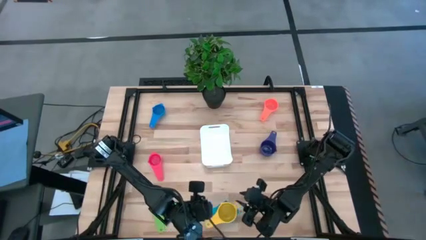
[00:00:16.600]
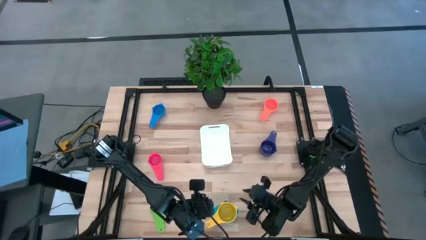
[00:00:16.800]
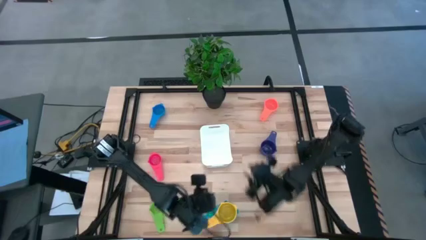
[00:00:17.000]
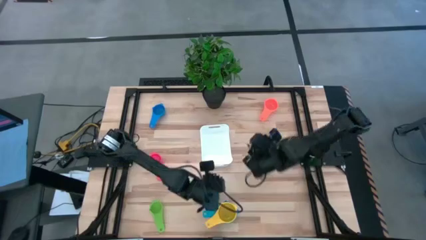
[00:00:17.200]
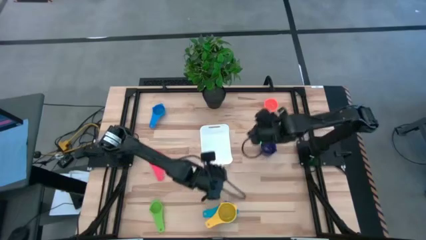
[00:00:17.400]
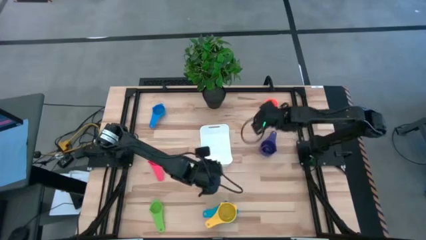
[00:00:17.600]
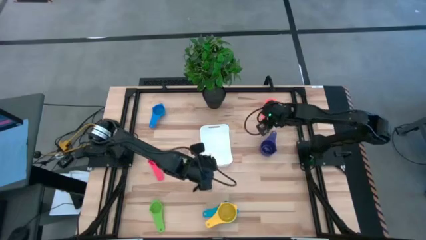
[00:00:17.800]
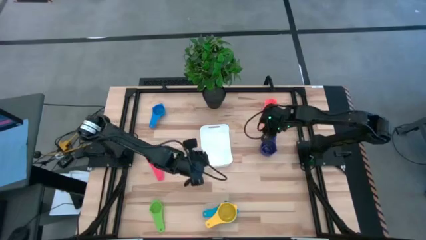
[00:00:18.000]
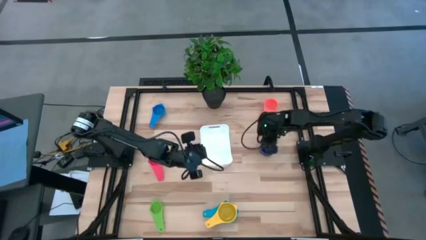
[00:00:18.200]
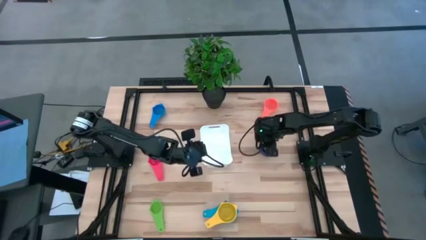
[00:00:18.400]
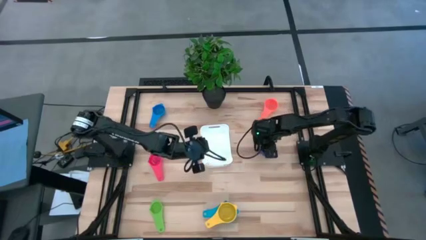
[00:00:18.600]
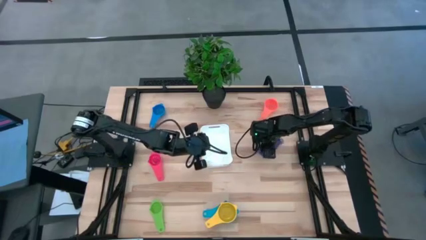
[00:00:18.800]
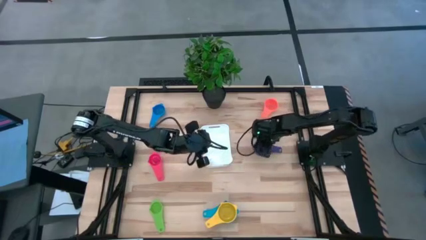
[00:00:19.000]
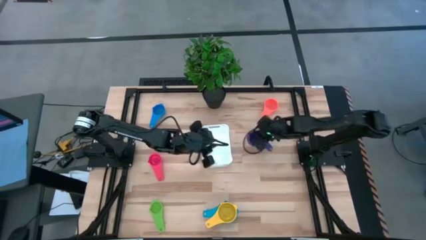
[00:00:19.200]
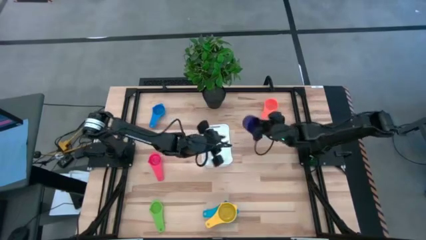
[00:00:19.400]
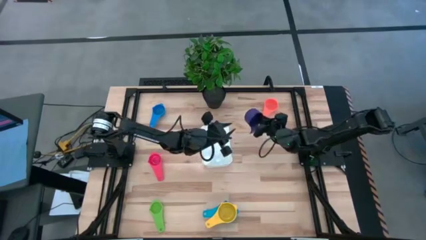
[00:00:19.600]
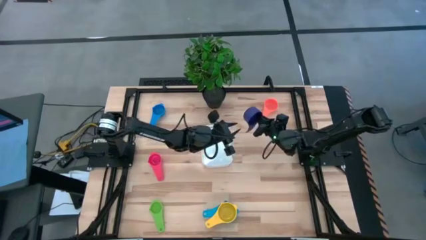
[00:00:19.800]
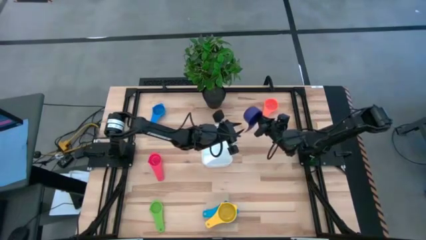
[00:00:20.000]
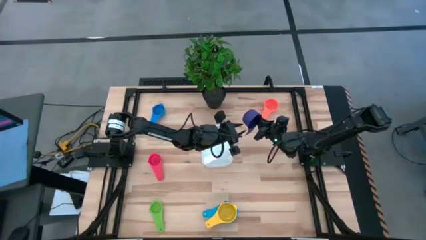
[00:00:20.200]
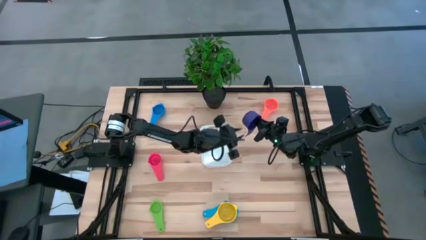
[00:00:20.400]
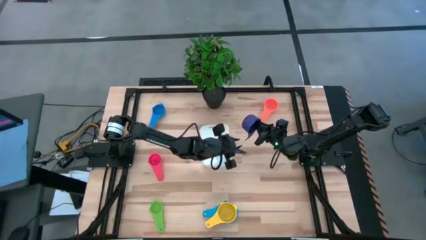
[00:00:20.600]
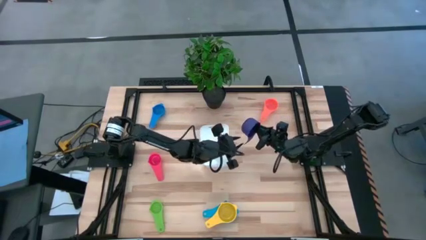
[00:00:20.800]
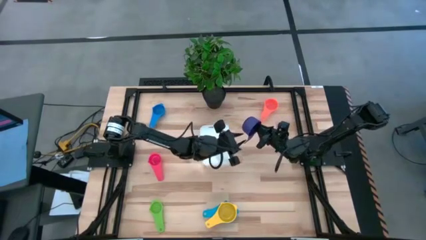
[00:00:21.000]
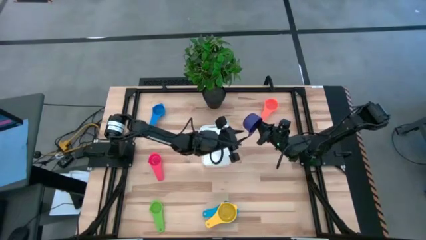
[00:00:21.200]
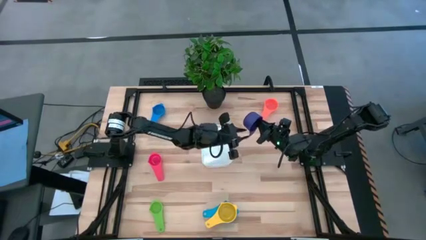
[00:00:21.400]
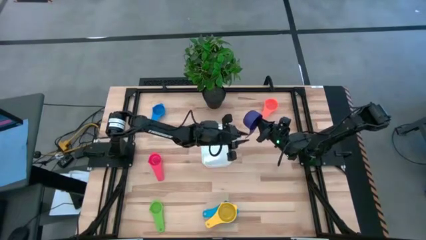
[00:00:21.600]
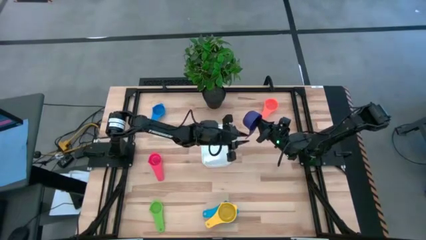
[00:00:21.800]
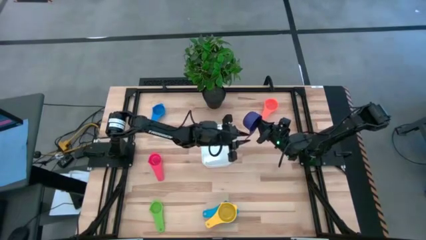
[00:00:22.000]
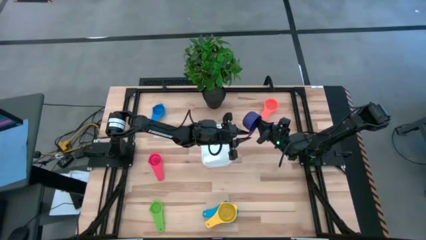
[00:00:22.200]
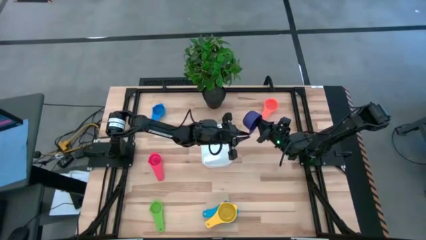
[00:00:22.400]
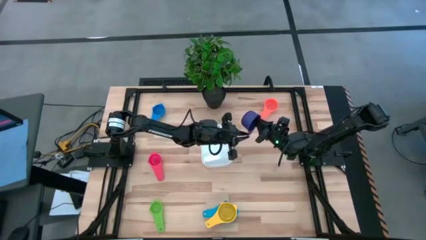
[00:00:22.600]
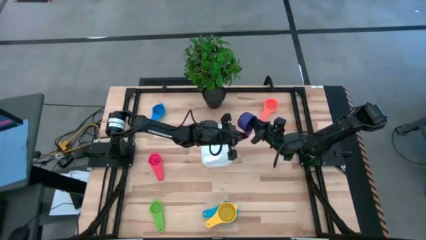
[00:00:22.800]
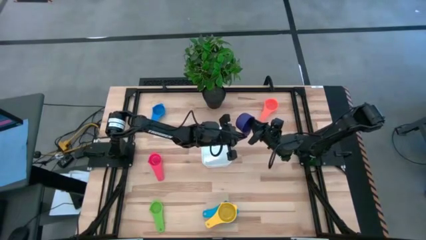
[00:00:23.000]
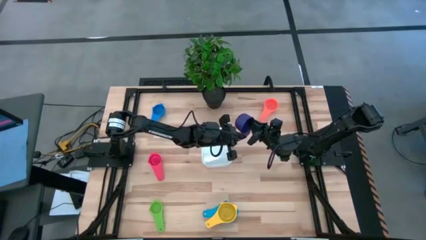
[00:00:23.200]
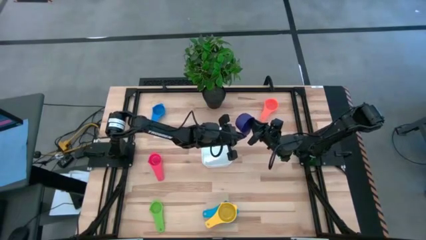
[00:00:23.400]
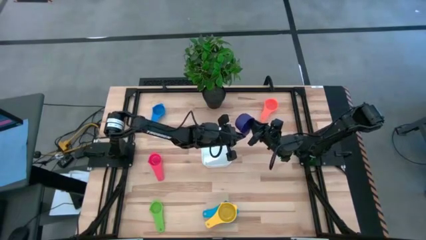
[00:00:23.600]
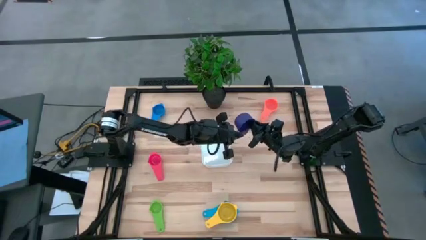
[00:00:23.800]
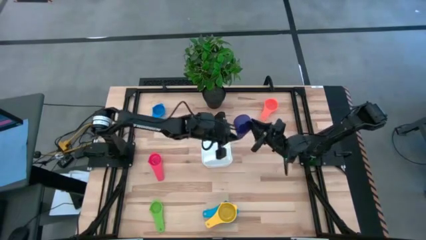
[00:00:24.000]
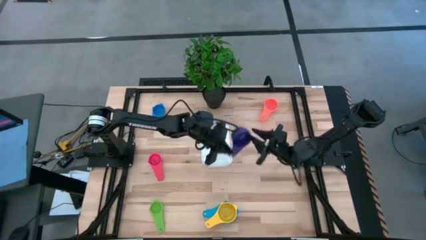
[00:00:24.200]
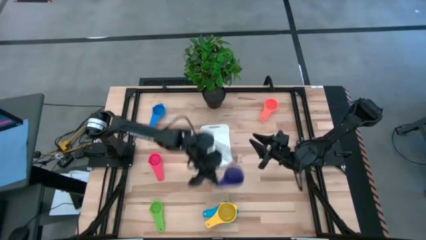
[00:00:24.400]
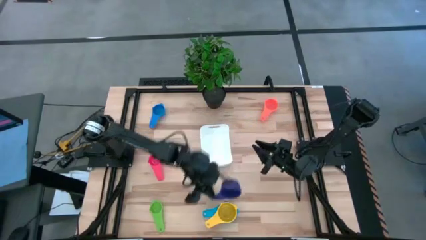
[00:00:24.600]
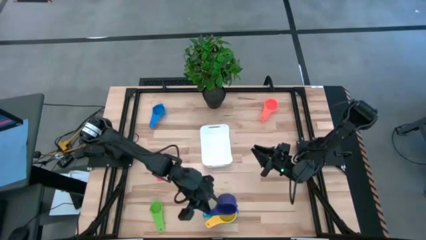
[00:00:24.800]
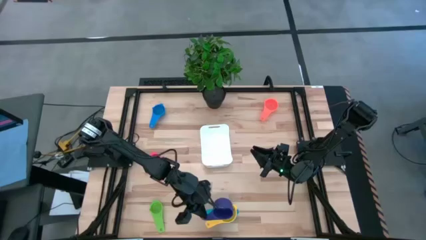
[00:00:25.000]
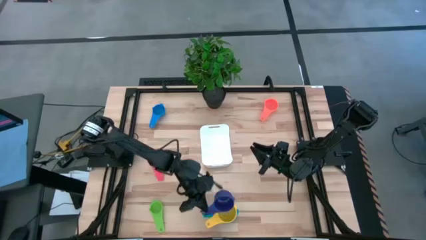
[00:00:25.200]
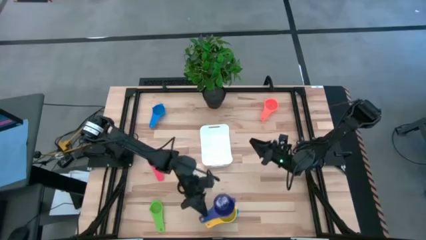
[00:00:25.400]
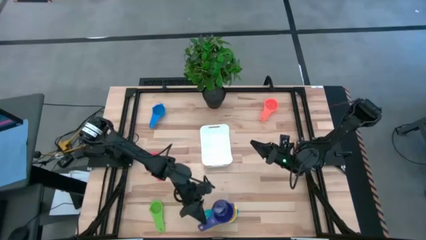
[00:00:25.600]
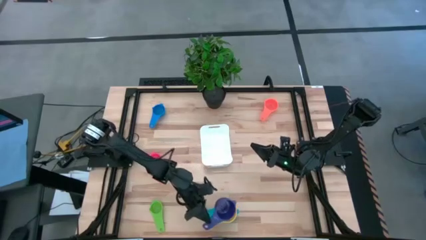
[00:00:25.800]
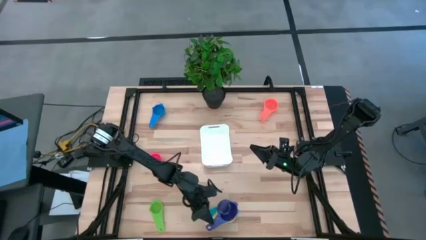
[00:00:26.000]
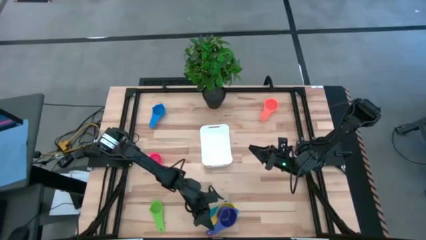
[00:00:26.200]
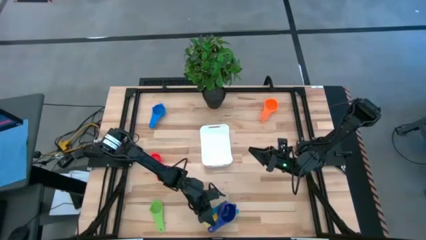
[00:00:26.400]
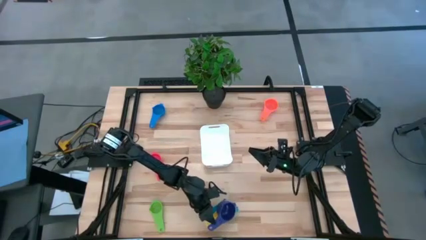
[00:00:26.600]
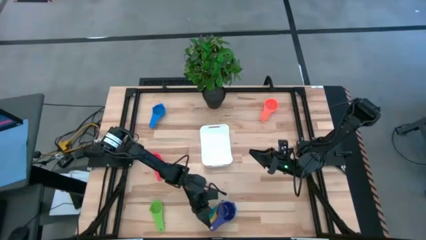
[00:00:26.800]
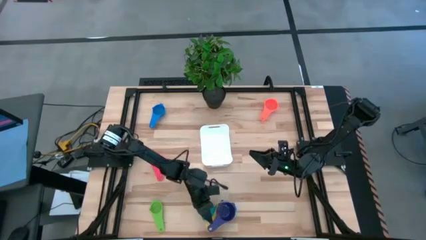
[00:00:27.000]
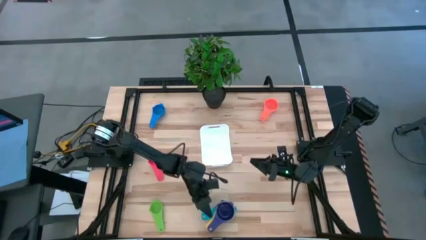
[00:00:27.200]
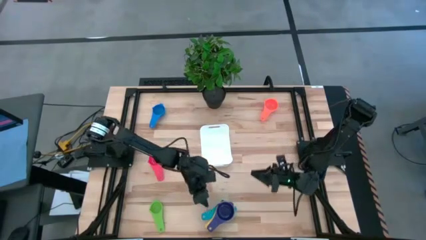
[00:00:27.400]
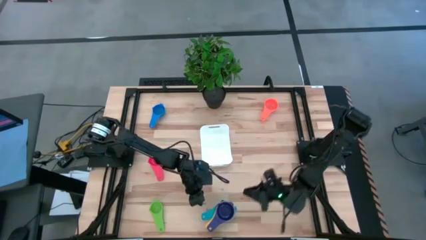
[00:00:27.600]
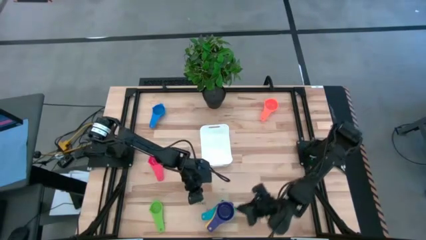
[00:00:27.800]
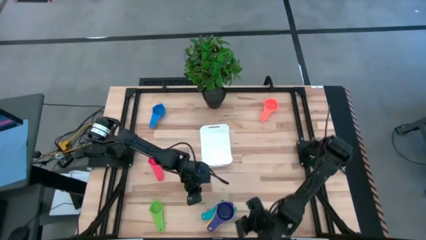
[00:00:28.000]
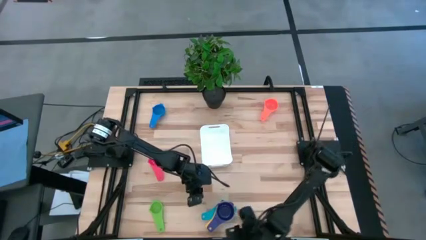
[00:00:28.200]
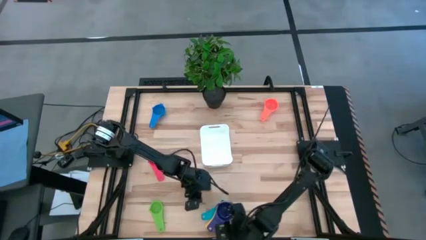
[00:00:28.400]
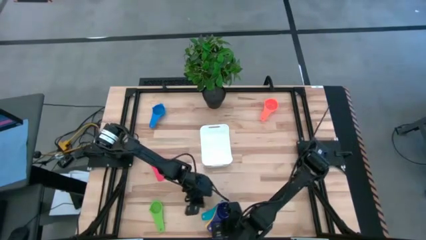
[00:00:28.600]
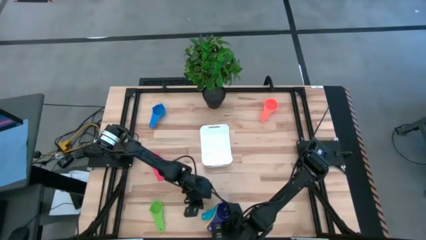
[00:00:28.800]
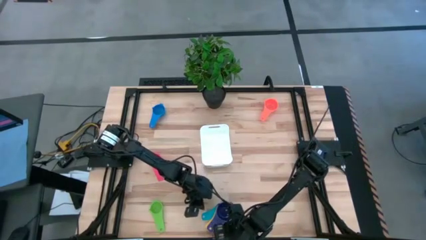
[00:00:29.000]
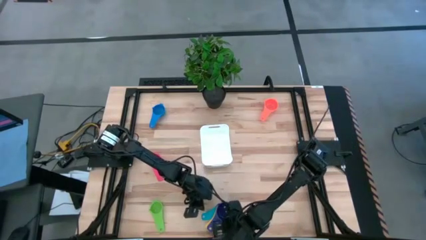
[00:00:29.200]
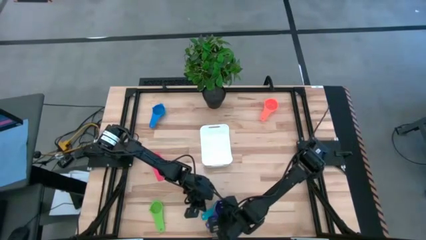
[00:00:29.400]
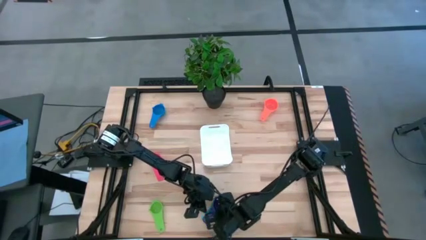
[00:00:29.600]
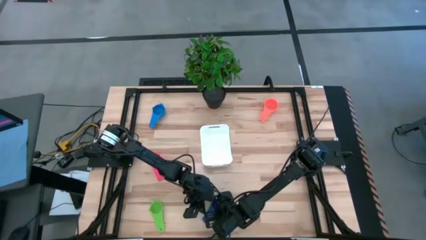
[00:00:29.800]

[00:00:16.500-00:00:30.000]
Task: Nest measuring cups in basket
Stack the violet measuring cup on top of the yellow measuring cup
